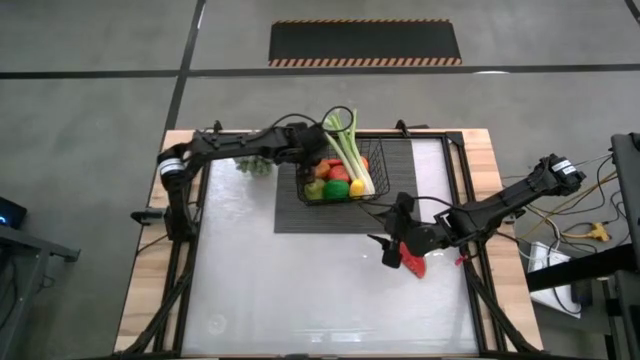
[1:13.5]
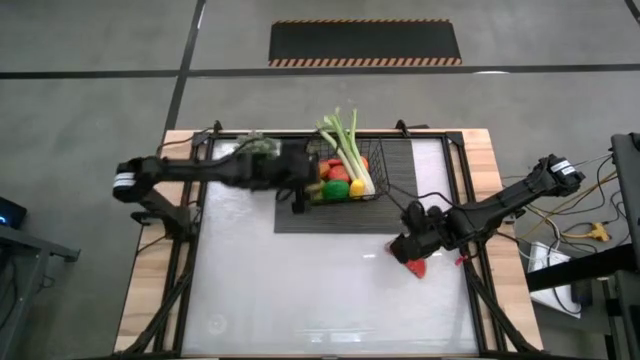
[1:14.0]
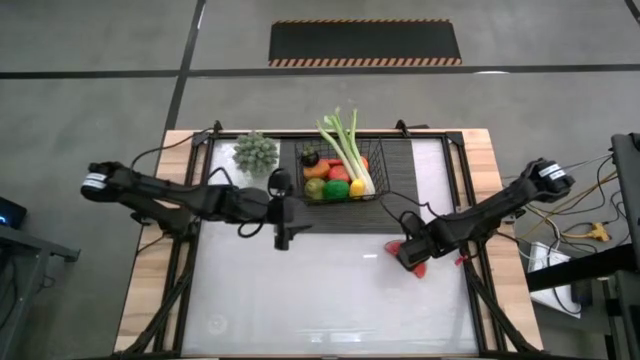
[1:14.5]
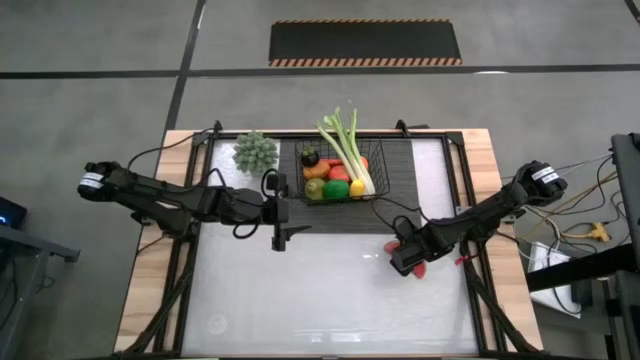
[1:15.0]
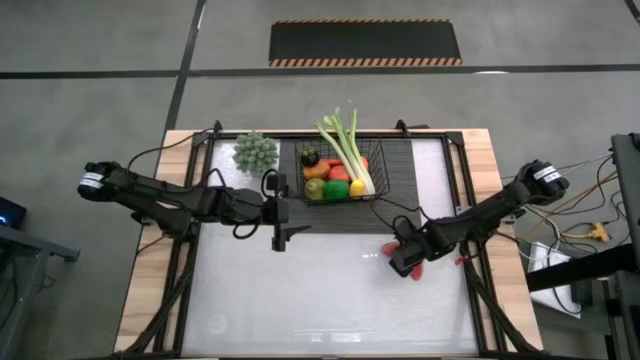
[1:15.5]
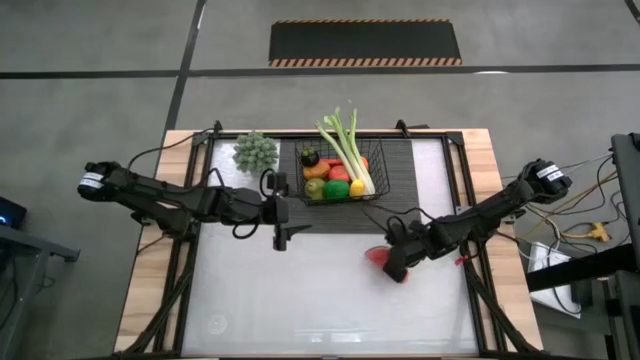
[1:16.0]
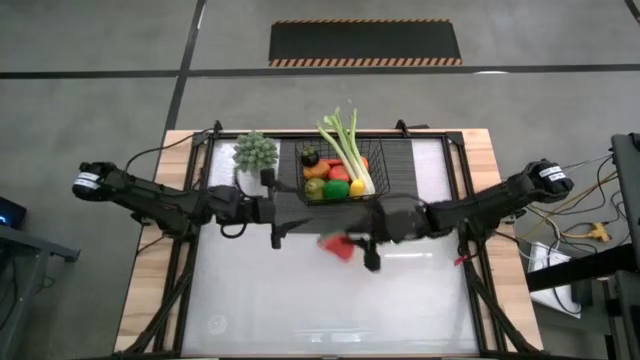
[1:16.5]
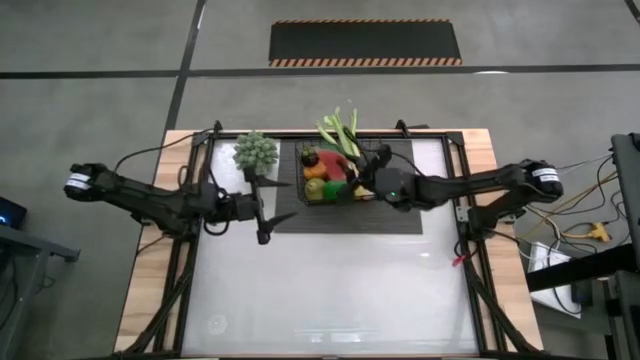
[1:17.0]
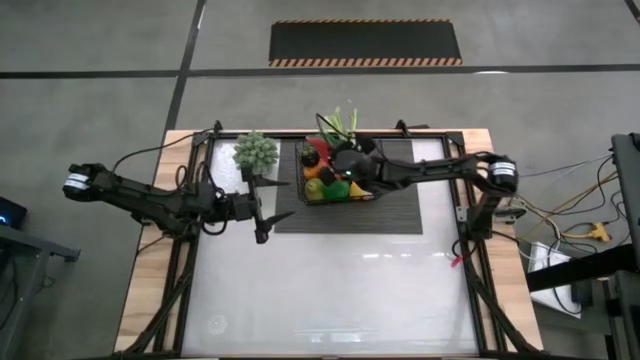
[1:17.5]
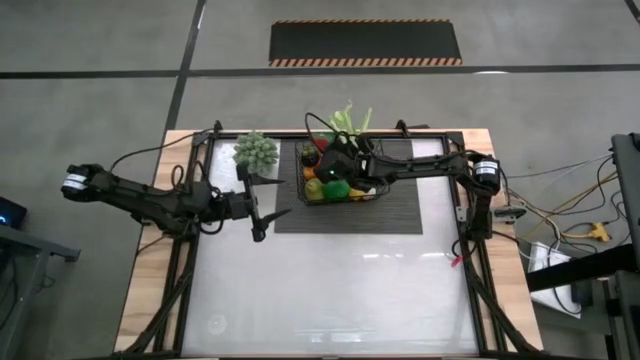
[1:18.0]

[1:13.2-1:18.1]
Task: Build produce basket
Put the red watermelon into the black wire basket

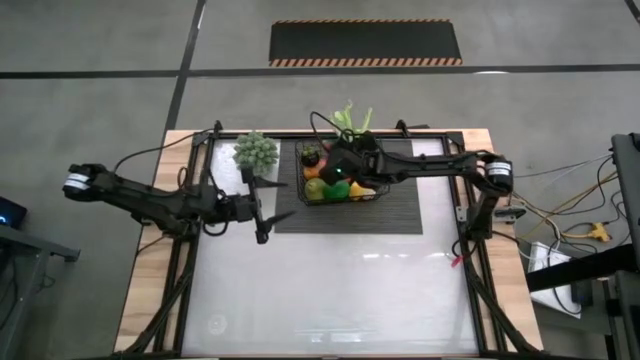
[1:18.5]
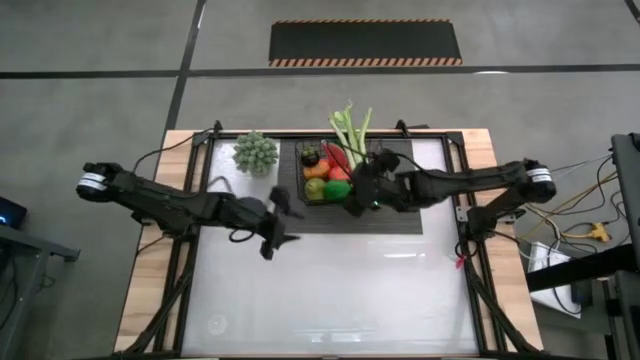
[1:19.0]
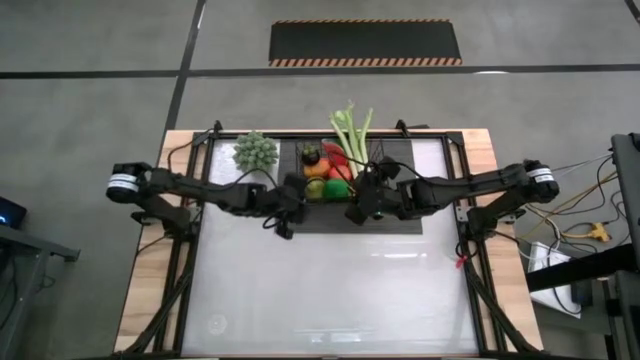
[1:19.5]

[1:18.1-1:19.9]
Move the black wire basket slightly upward on the table

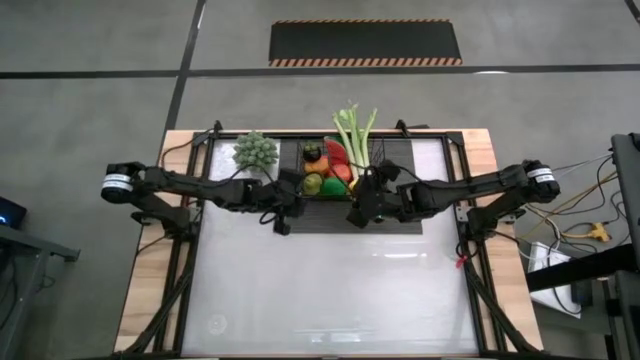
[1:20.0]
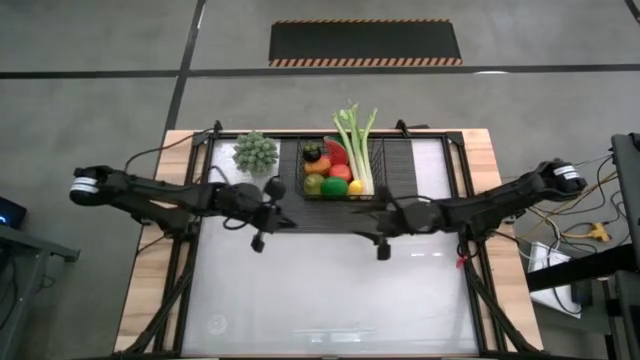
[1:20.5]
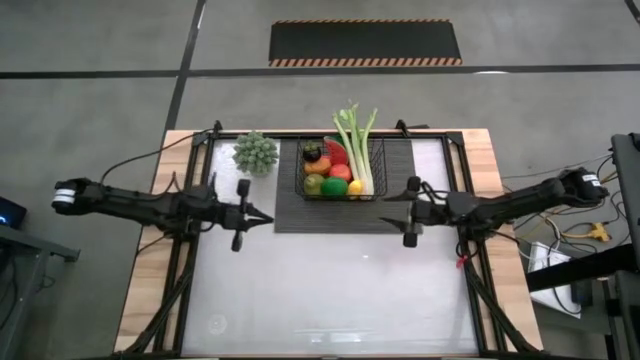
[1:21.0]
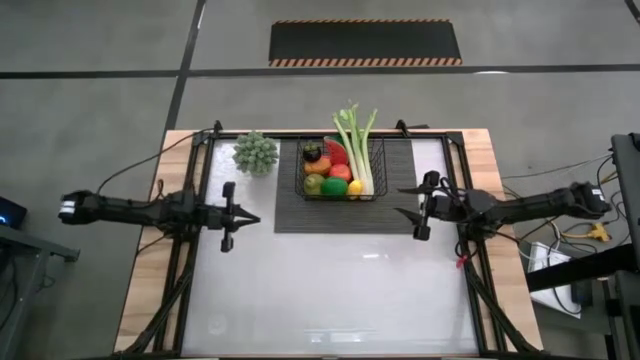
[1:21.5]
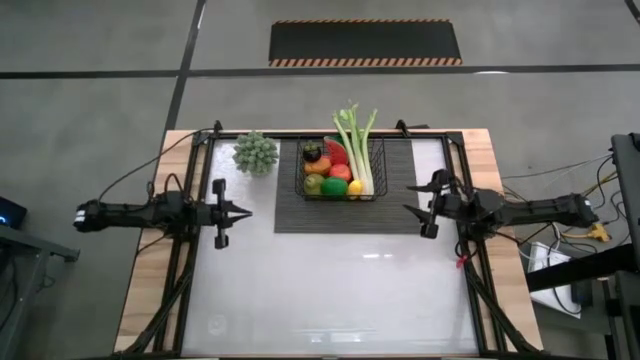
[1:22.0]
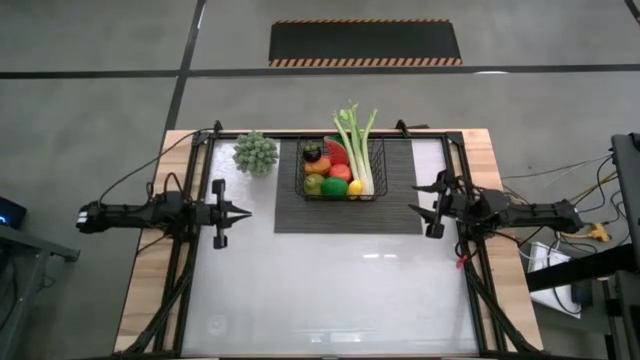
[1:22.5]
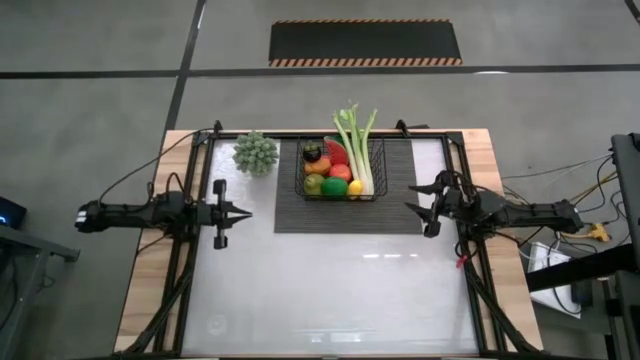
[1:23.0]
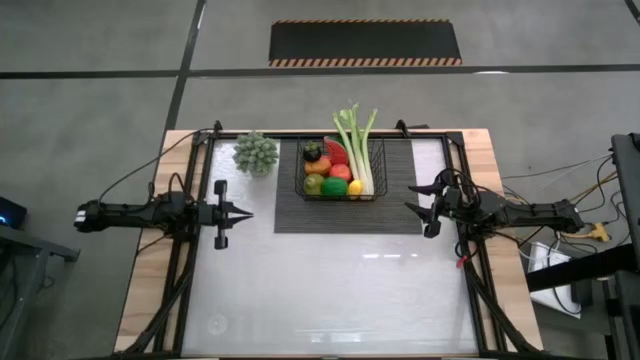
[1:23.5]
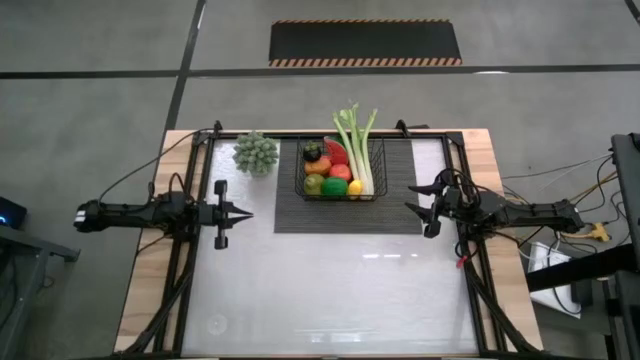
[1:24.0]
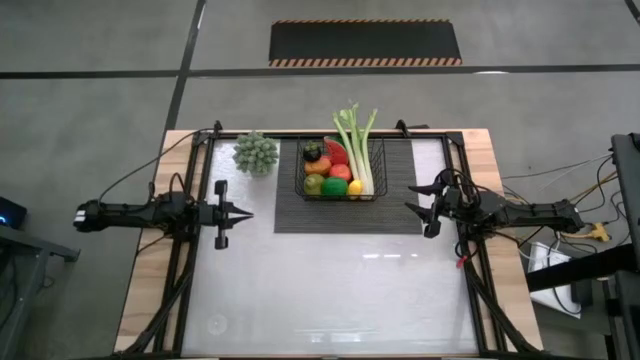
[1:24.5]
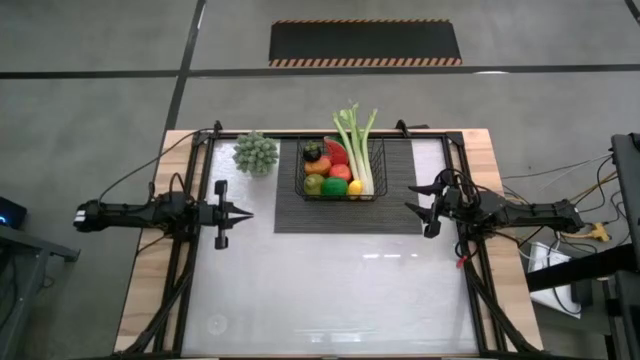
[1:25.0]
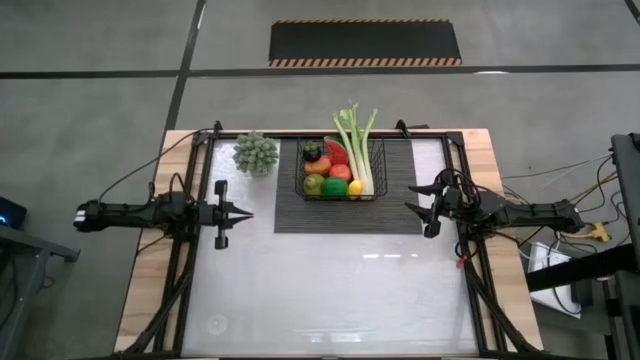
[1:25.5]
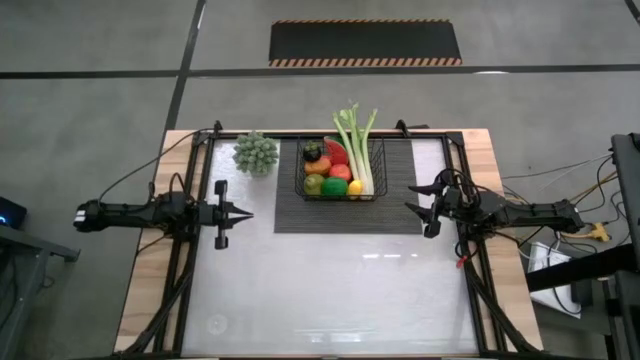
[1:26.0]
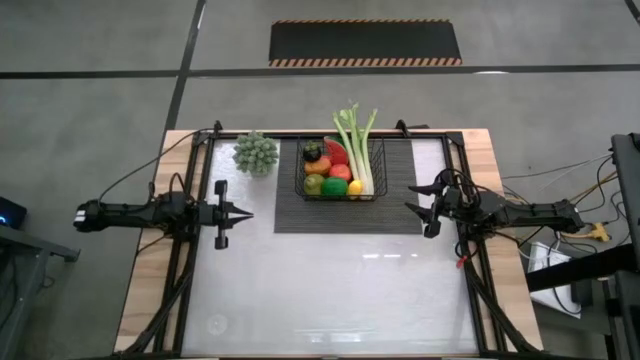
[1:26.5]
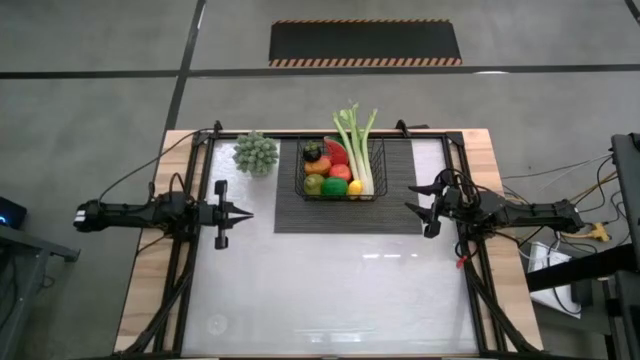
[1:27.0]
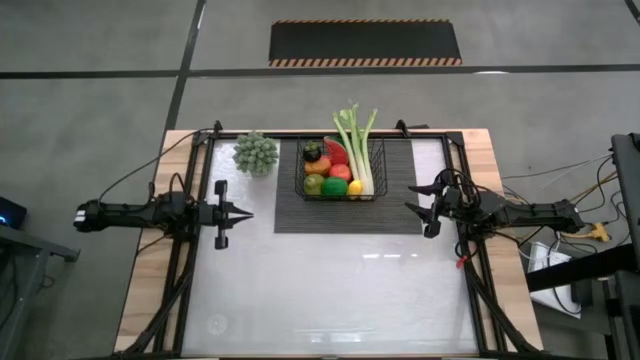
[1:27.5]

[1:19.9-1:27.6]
Return to Home Position

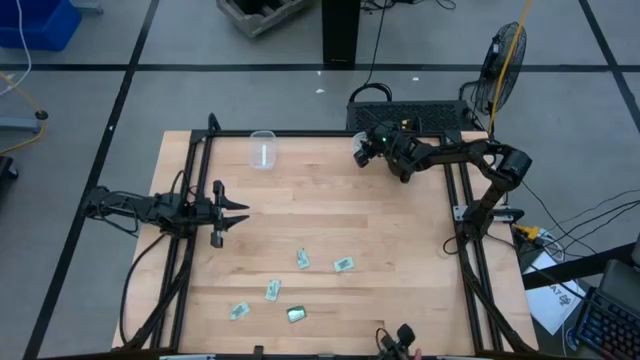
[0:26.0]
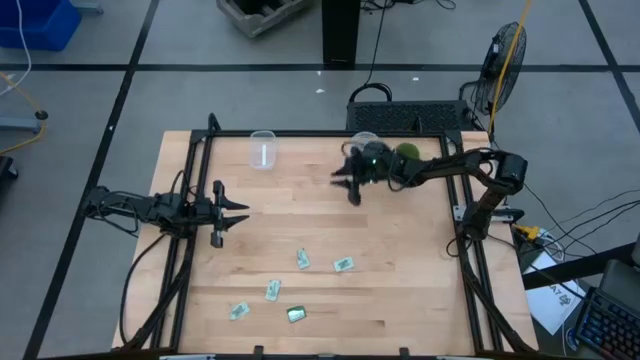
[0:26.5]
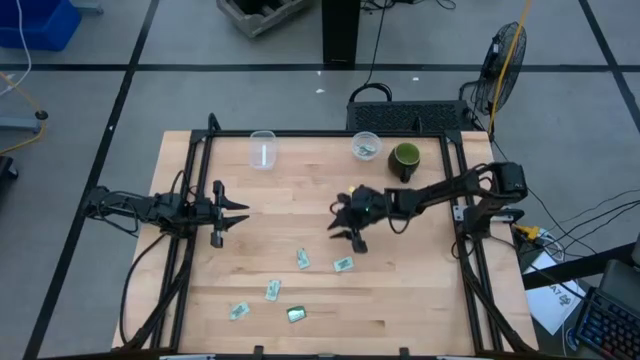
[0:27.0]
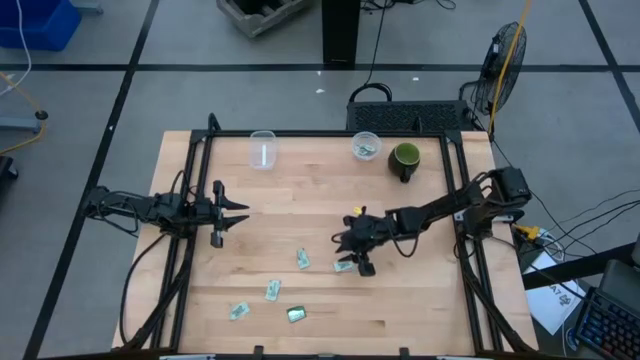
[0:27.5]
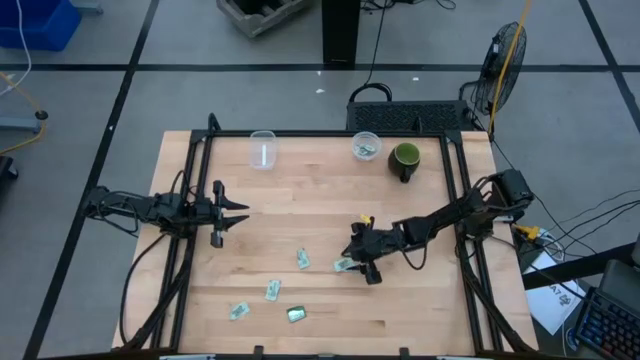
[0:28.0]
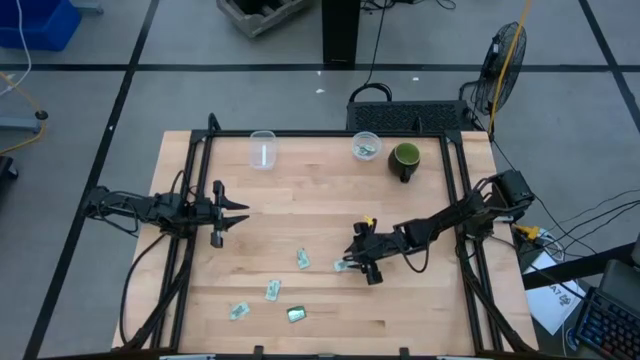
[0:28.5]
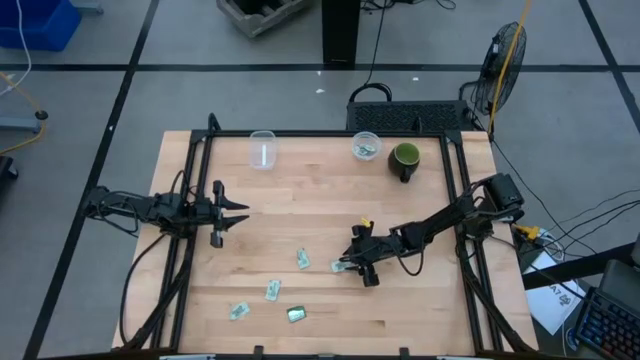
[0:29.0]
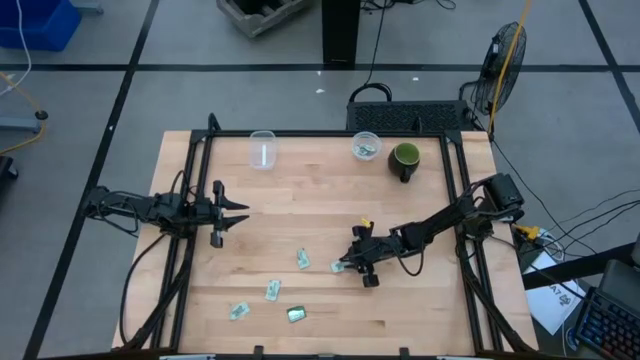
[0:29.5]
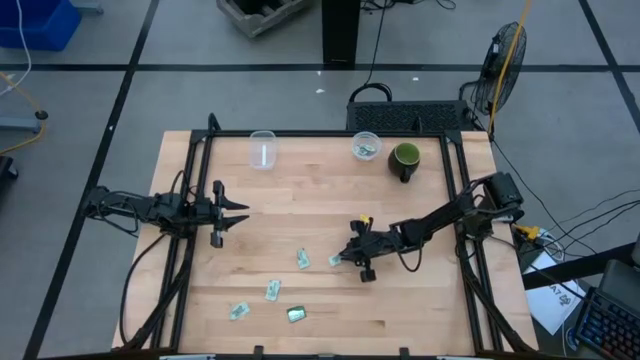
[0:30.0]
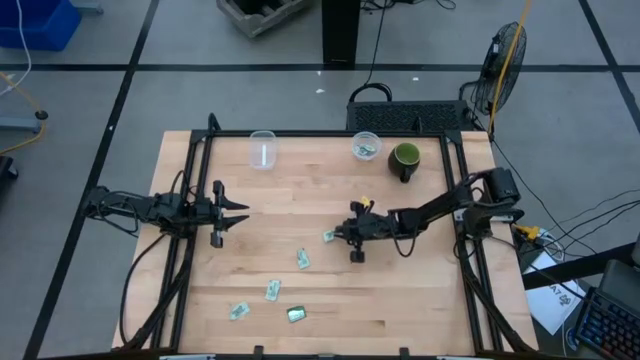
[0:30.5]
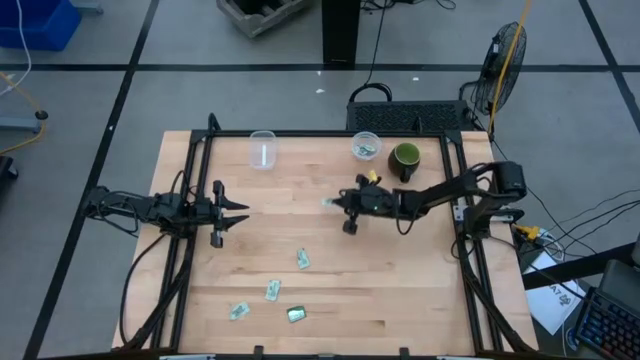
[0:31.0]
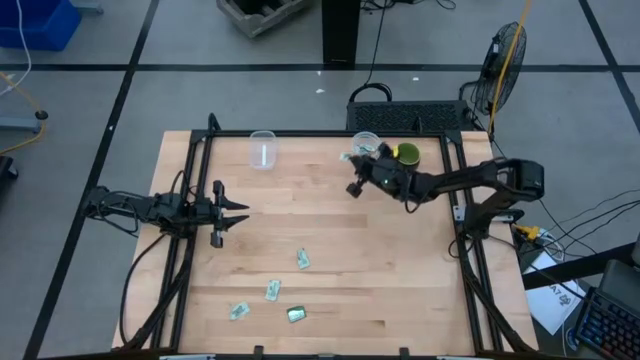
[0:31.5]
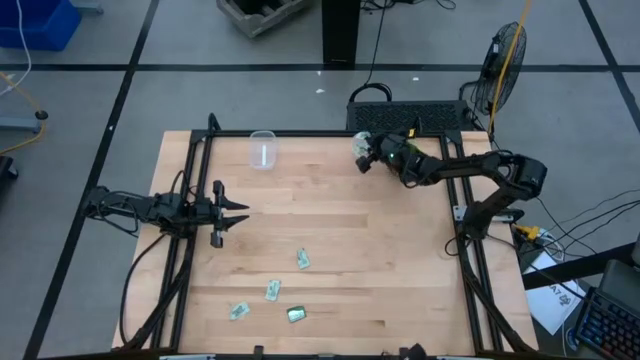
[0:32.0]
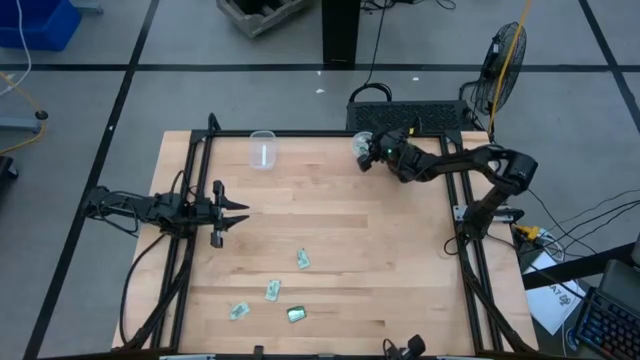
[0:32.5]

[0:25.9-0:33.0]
Task: Pick and place items into bin
Put the green stevia packet into the right transparent bin
